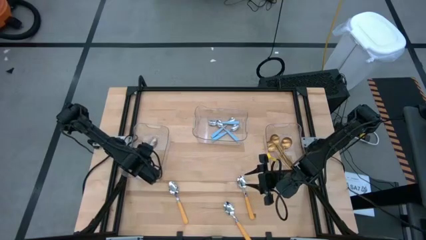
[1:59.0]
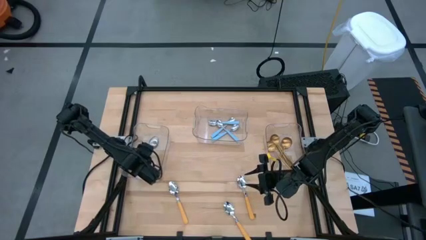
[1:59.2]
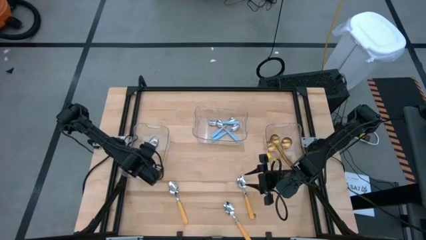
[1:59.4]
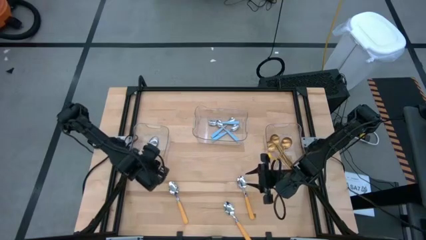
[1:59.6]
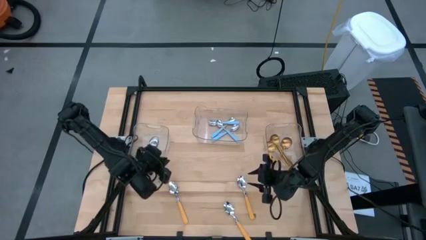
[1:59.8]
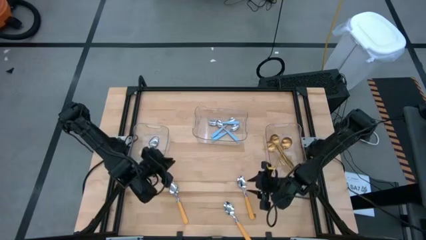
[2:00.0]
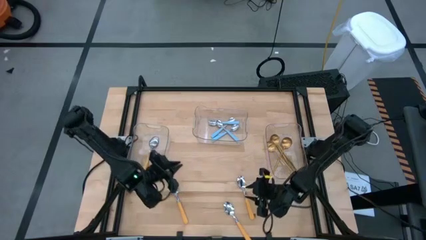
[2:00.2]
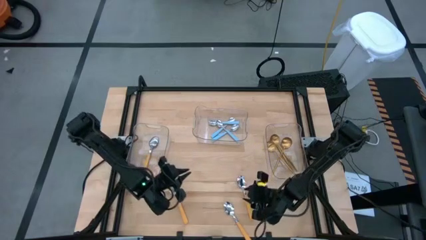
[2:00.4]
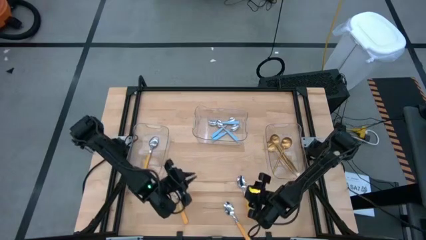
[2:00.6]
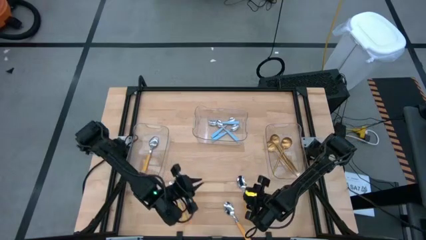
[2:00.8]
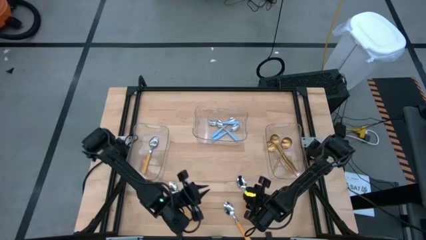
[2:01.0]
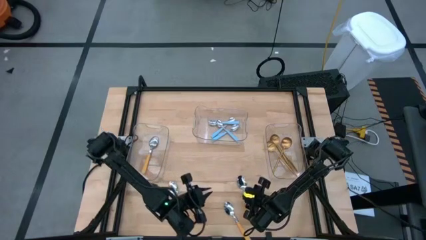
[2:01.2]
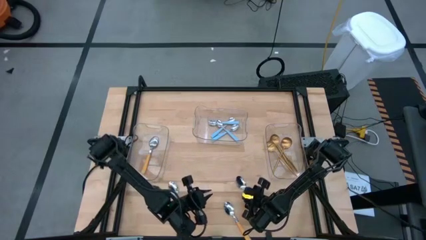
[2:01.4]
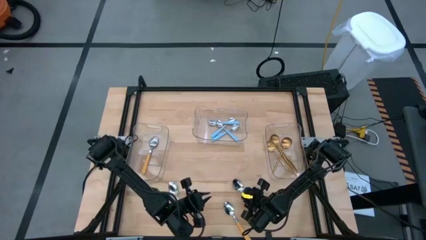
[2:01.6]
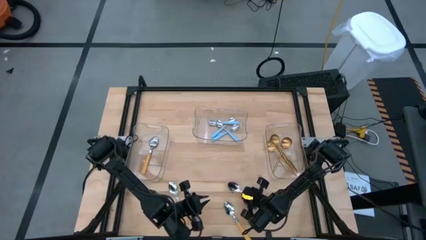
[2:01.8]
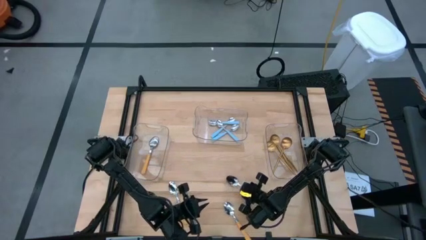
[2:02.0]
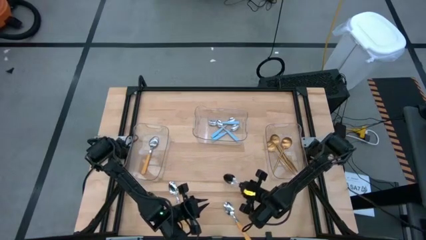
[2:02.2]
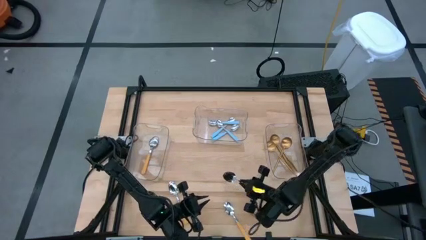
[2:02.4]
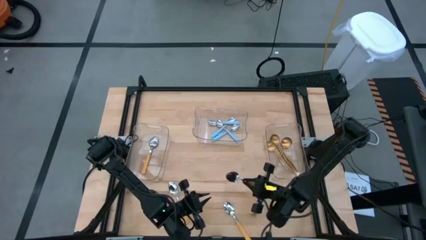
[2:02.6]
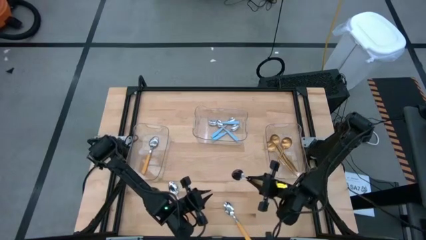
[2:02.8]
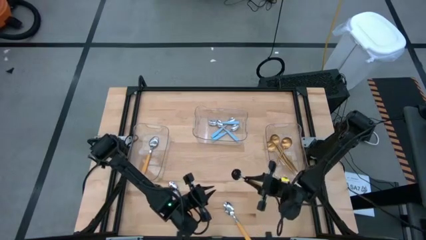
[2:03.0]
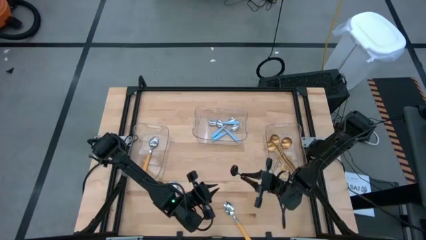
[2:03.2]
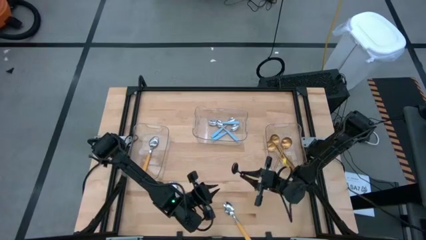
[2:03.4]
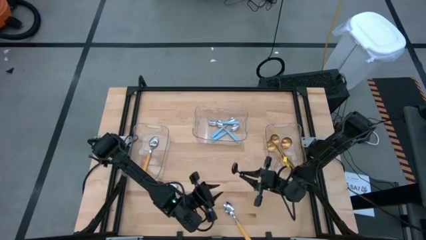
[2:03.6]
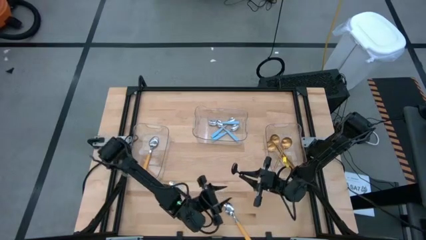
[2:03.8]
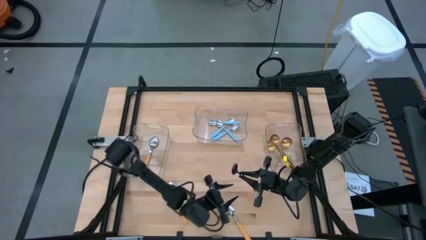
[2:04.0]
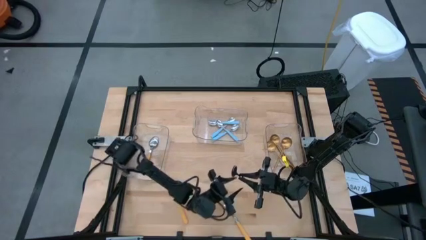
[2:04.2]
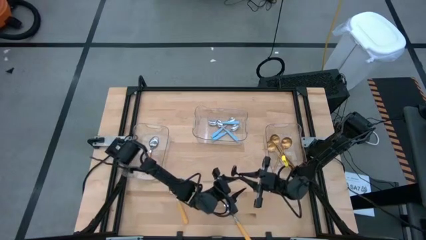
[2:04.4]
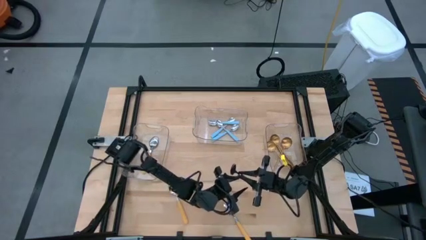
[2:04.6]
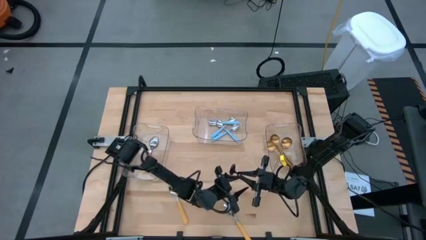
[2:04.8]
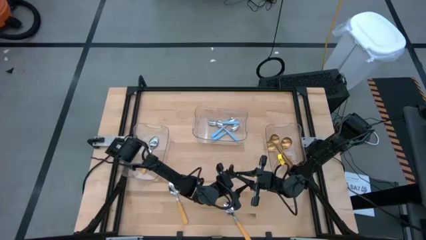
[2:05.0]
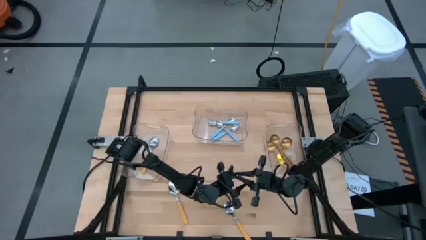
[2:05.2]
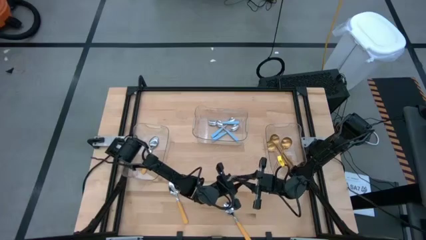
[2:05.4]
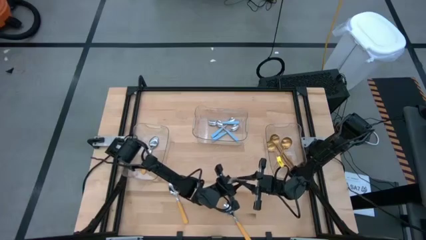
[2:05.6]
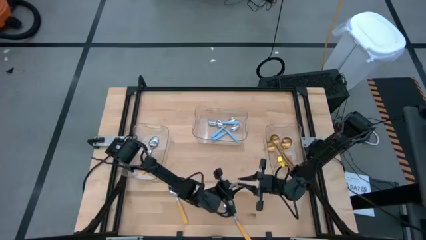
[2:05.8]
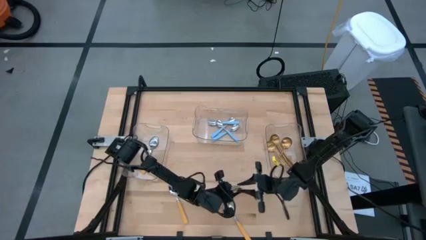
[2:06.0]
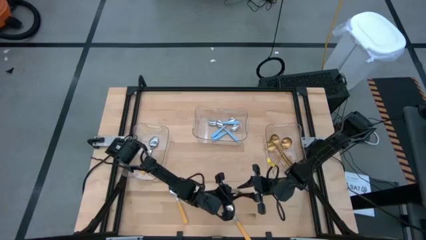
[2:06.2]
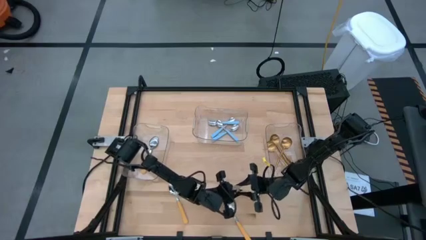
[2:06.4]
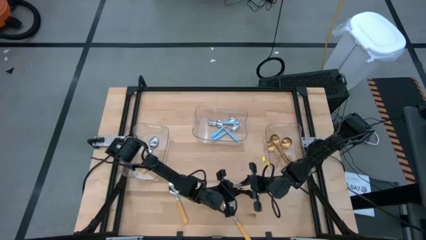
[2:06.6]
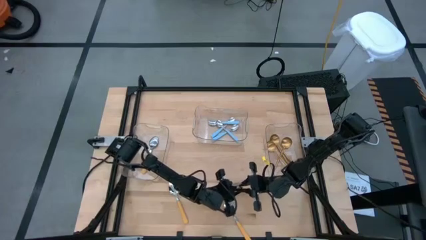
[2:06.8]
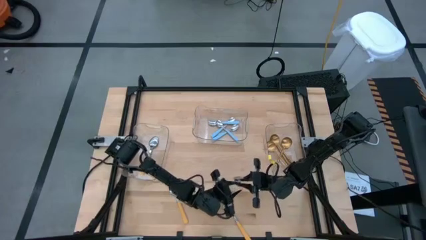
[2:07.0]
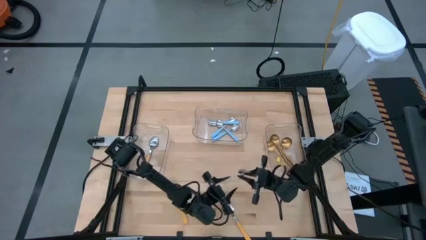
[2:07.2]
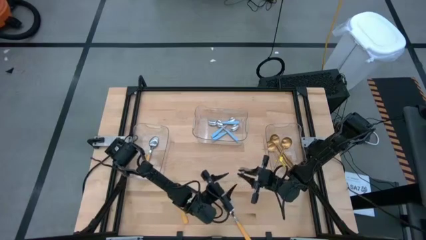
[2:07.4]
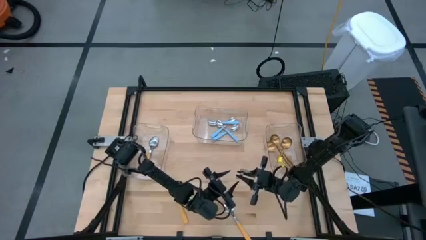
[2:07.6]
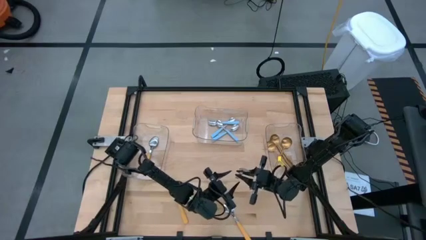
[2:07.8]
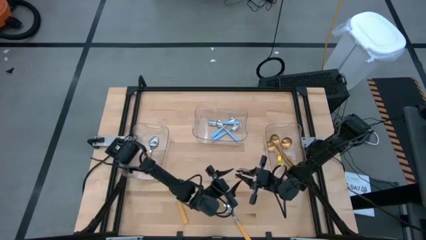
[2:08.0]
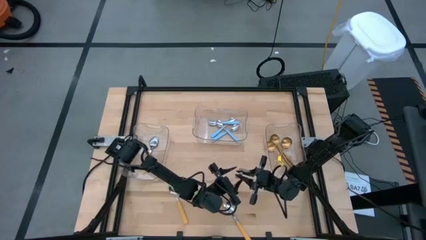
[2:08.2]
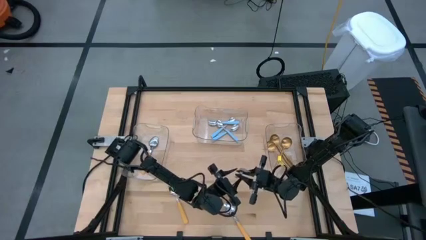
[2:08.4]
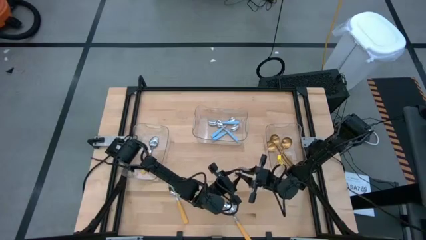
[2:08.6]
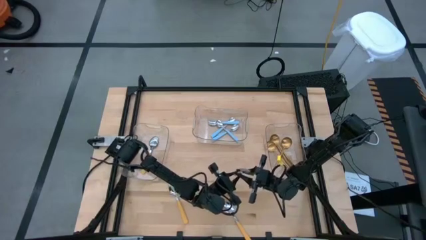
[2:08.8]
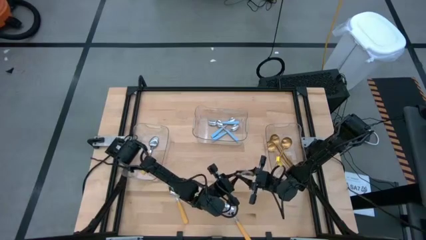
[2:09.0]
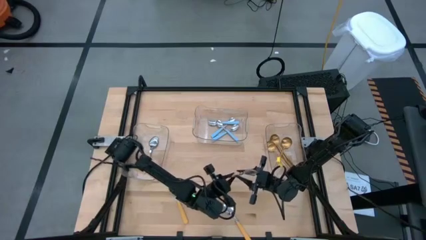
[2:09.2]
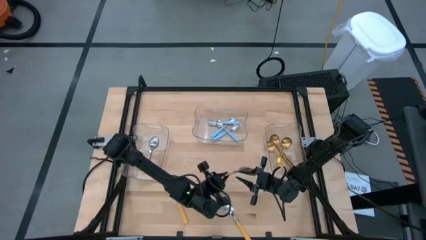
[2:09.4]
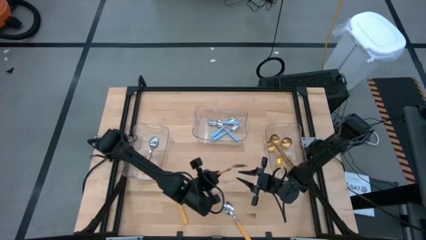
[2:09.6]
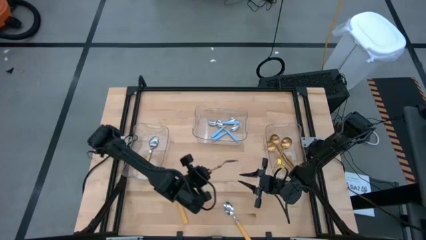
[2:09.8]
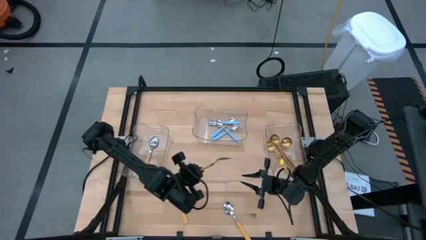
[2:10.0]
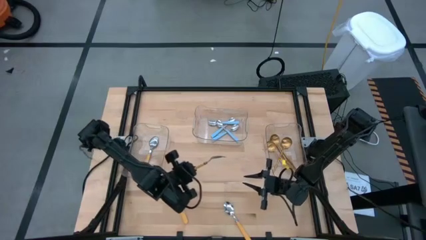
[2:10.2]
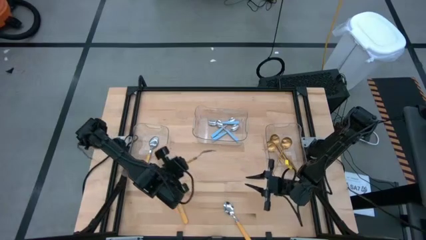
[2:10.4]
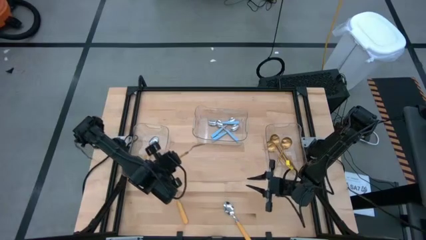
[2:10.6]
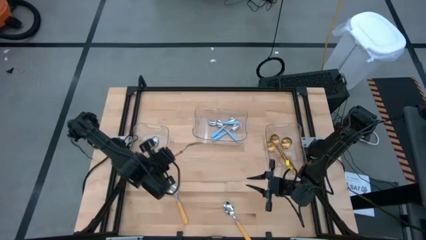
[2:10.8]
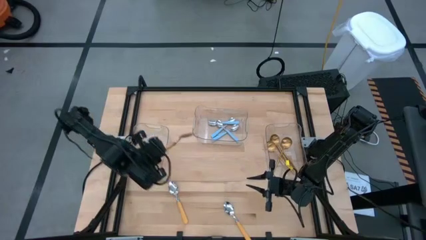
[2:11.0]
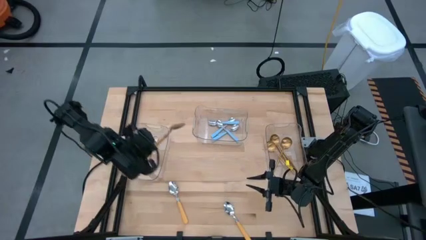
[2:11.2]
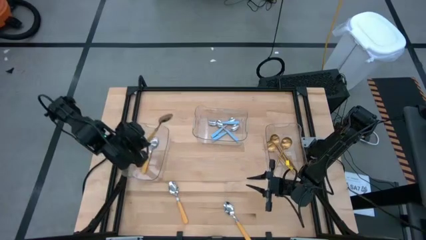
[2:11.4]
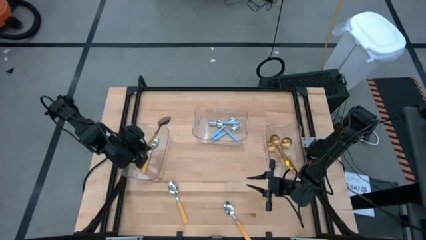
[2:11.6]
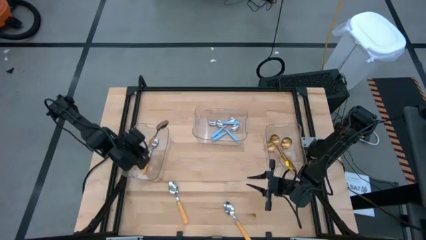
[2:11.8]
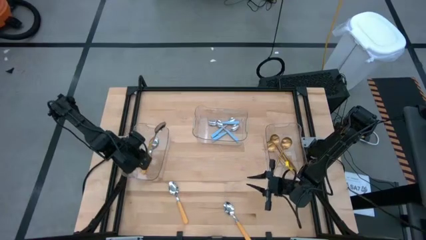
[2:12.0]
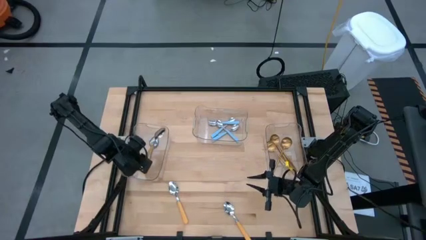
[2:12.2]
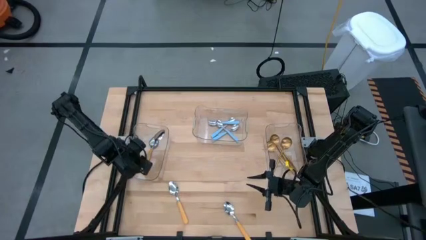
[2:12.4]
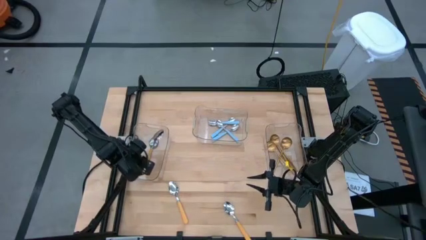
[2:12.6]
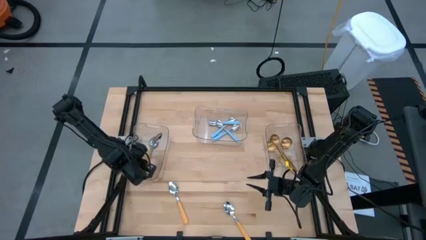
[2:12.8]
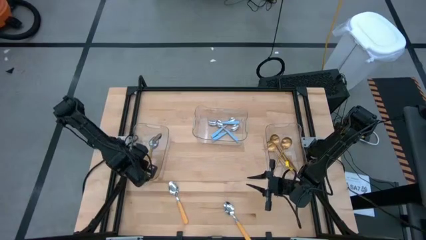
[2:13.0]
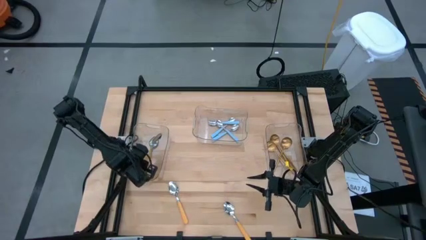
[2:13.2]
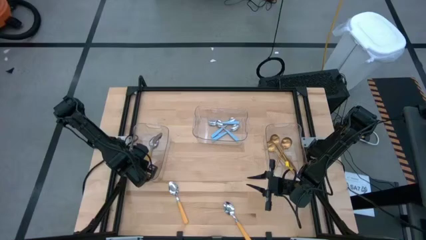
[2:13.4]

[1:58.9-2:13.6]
Task: Sort silverware by color (type)
Put the yellow spoon into the left transparent bin

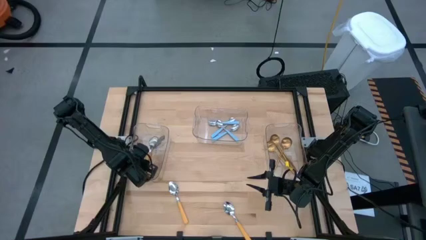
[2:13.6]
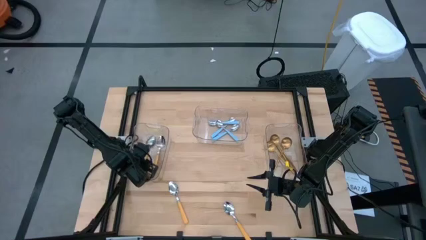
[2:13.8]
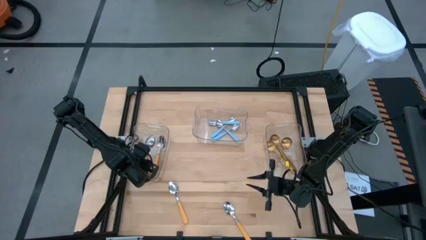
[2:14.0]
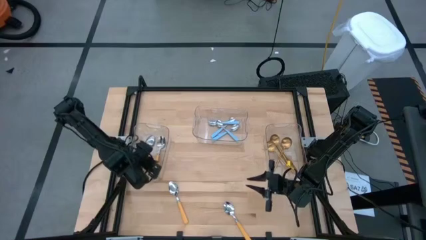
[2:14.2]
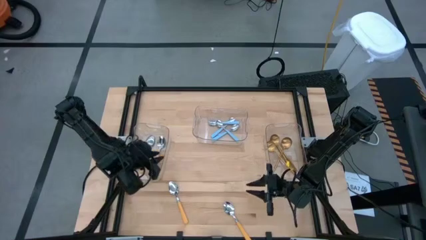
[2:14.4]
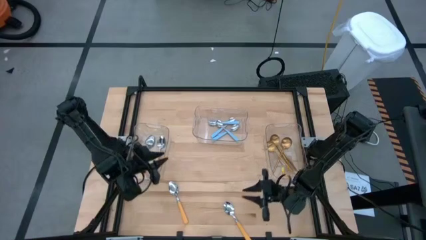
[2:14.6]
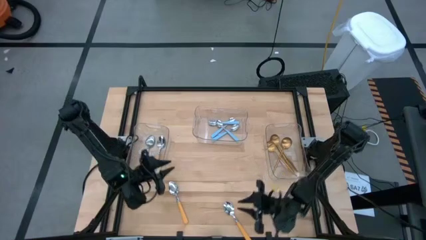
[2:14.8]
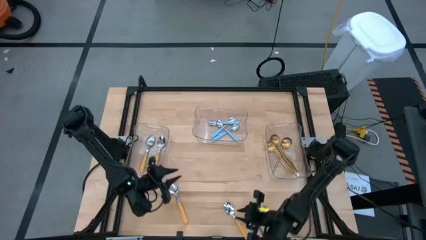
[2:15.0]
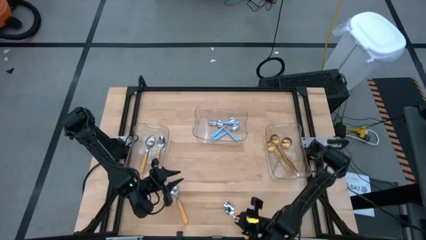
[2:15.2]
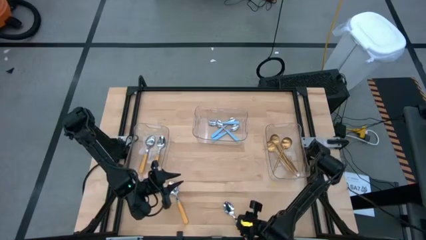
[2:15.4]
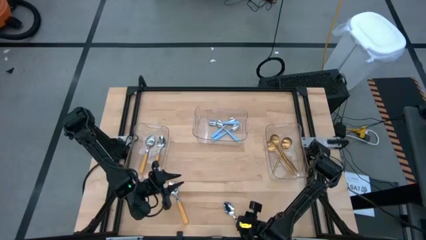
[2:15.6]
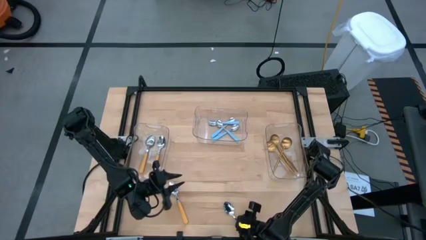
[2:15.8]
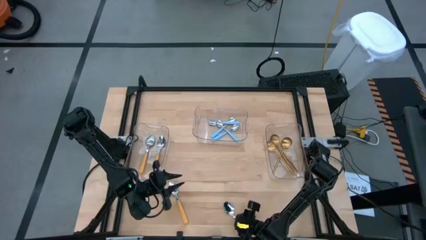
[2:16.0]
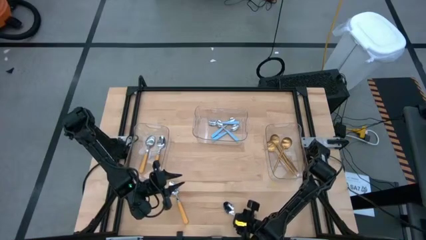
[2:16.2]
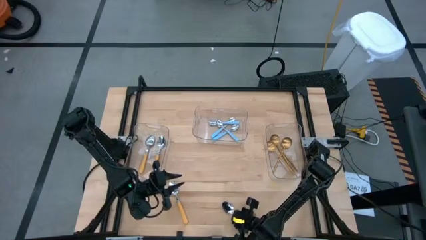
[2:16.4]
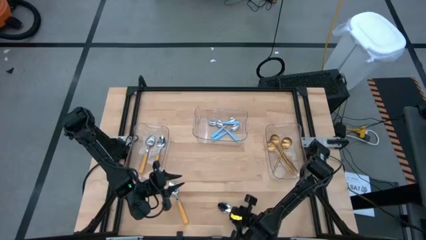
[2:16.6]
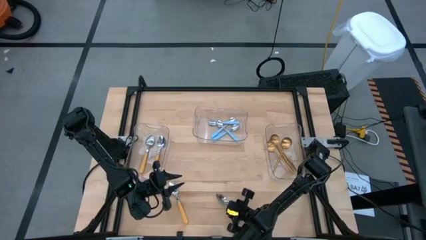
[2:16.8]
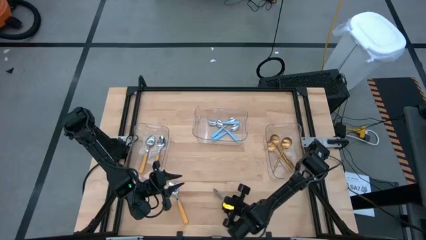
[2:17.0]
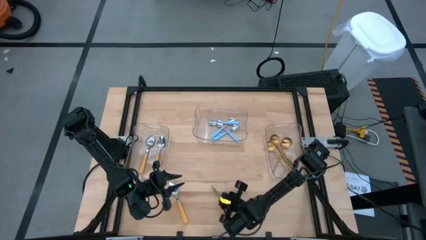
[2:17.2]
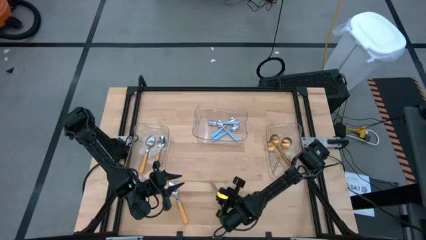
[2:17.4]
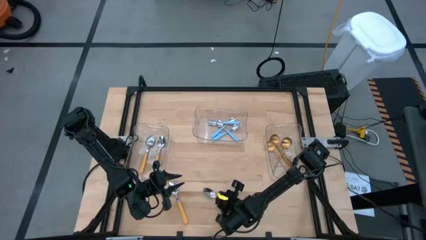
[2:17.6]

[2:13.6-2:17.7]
Put the yellow spoon into the left transparent bin
